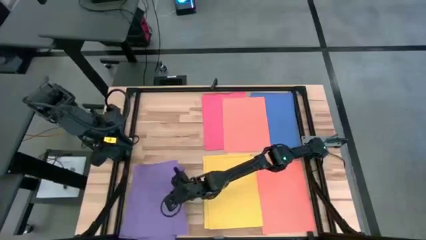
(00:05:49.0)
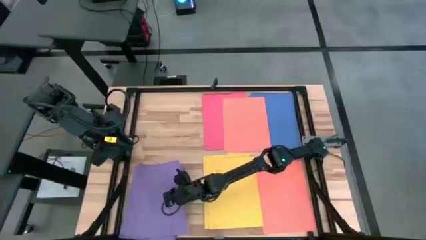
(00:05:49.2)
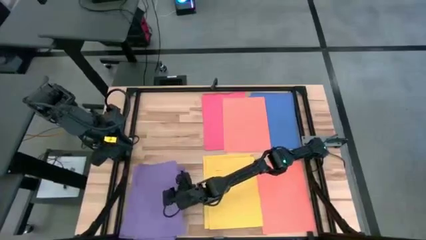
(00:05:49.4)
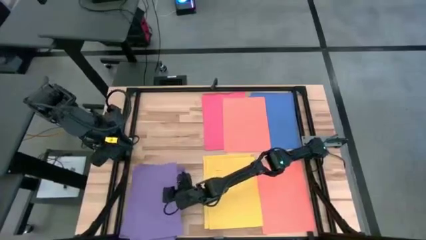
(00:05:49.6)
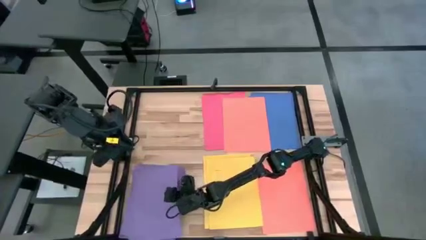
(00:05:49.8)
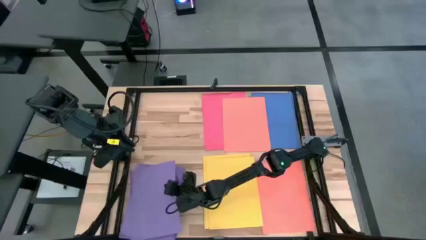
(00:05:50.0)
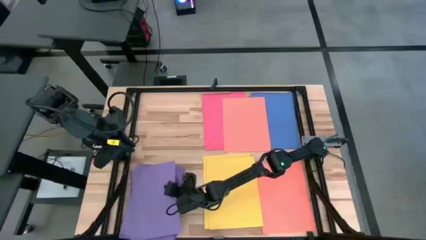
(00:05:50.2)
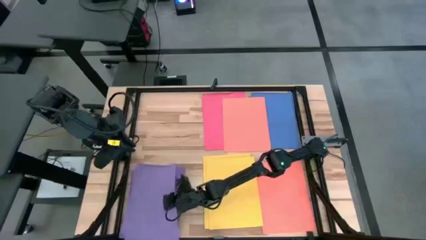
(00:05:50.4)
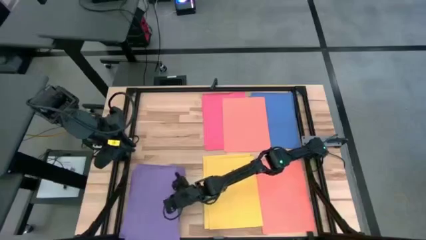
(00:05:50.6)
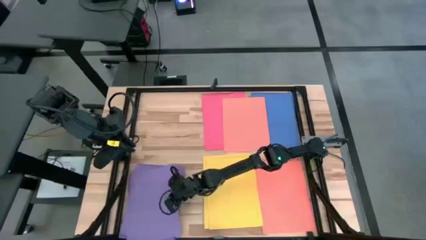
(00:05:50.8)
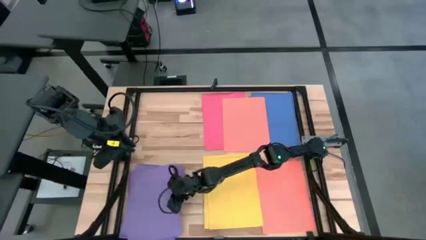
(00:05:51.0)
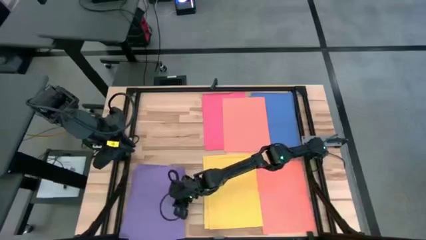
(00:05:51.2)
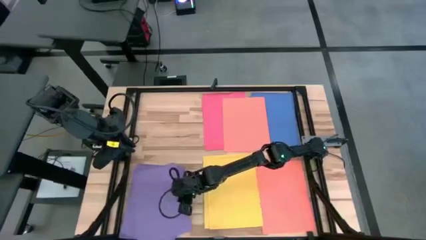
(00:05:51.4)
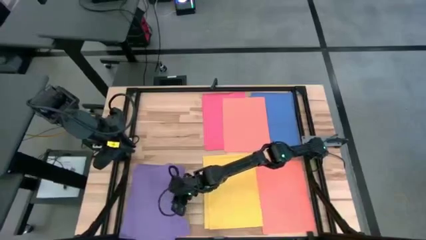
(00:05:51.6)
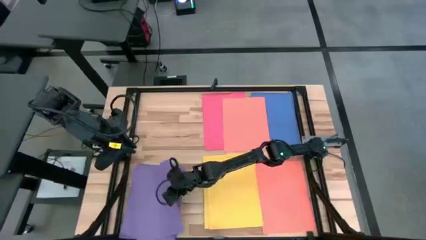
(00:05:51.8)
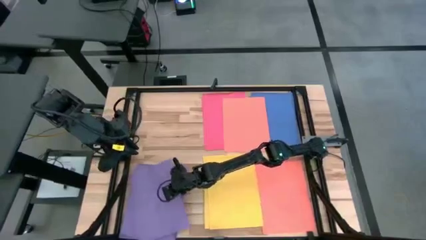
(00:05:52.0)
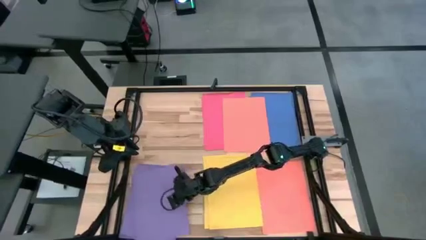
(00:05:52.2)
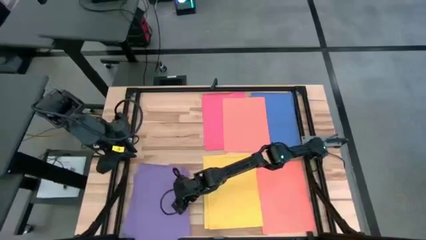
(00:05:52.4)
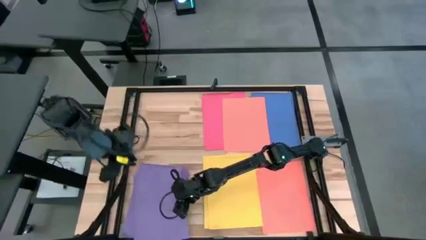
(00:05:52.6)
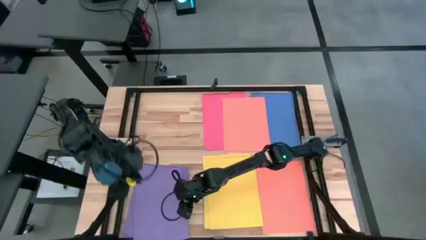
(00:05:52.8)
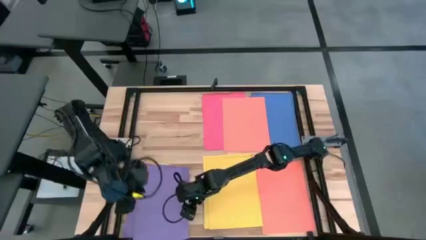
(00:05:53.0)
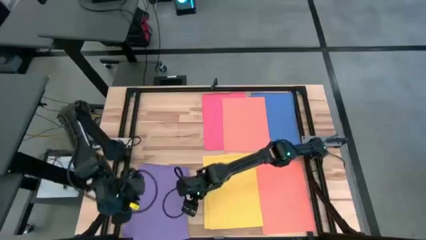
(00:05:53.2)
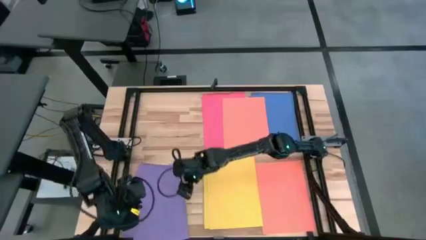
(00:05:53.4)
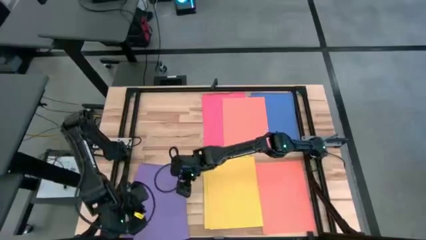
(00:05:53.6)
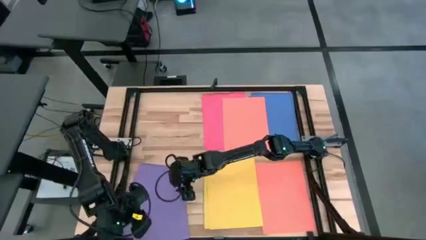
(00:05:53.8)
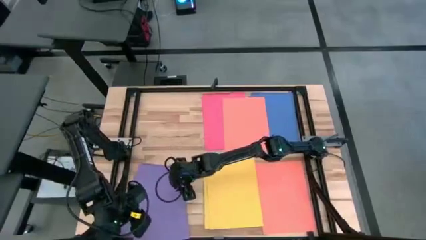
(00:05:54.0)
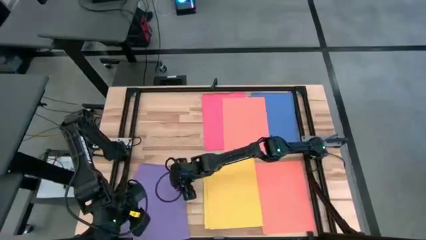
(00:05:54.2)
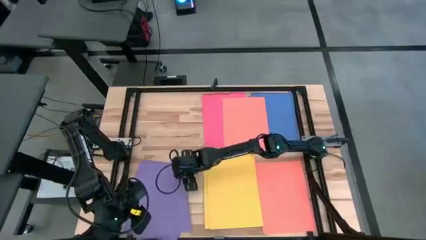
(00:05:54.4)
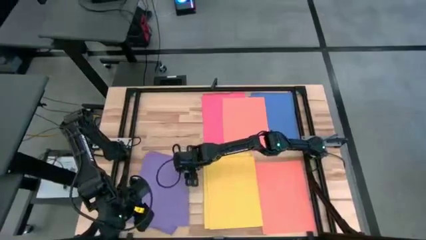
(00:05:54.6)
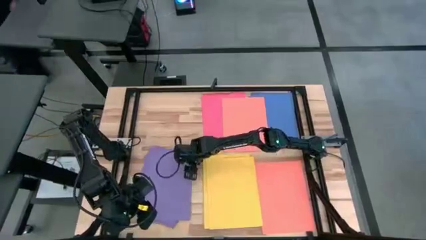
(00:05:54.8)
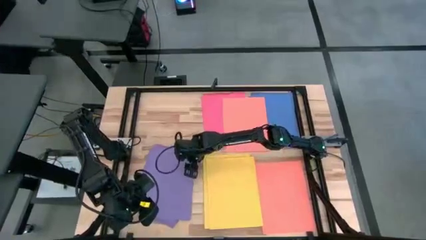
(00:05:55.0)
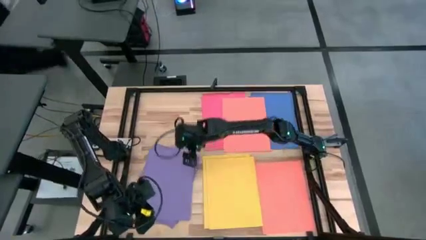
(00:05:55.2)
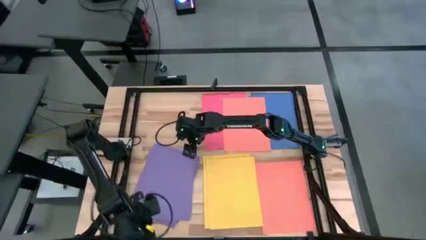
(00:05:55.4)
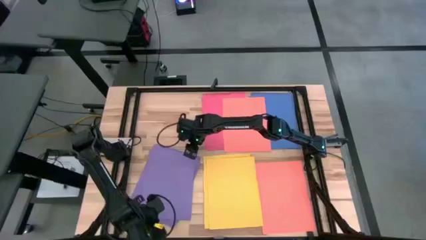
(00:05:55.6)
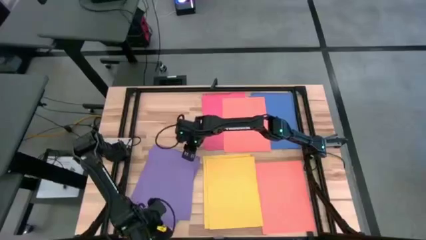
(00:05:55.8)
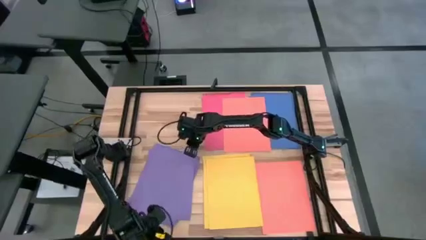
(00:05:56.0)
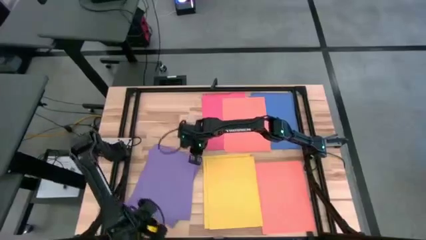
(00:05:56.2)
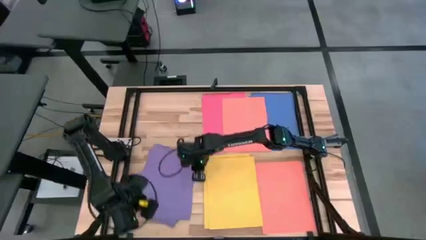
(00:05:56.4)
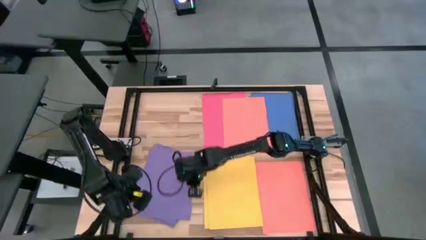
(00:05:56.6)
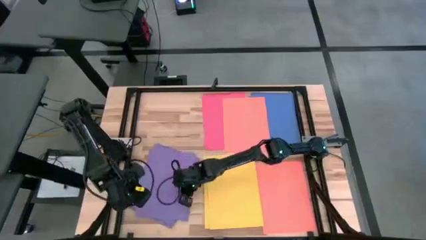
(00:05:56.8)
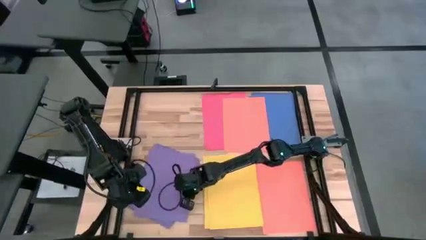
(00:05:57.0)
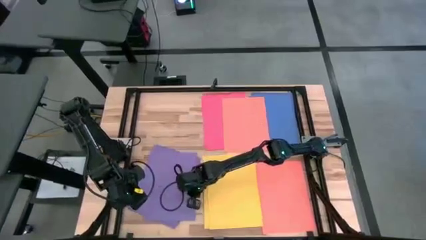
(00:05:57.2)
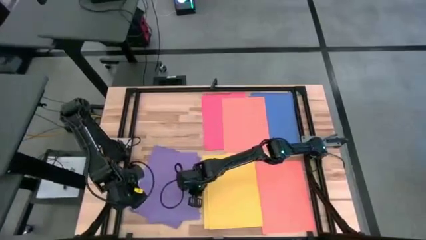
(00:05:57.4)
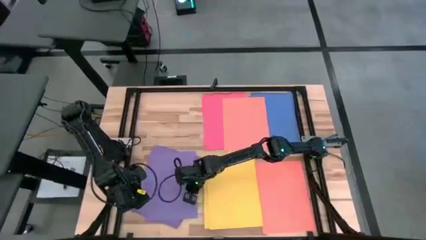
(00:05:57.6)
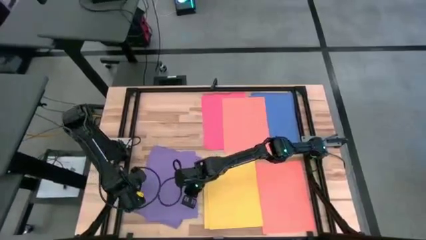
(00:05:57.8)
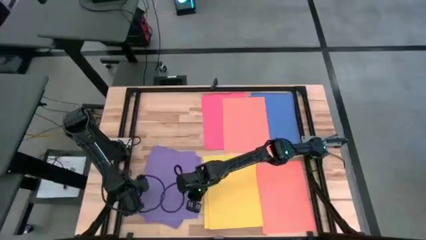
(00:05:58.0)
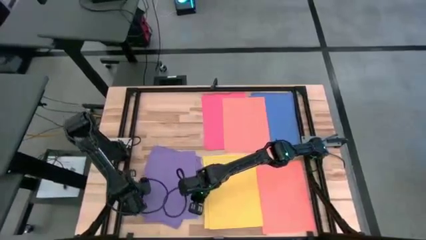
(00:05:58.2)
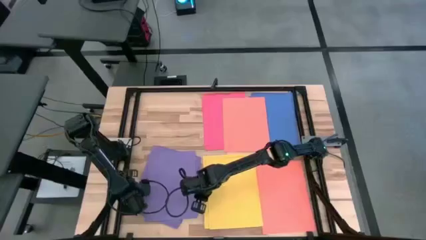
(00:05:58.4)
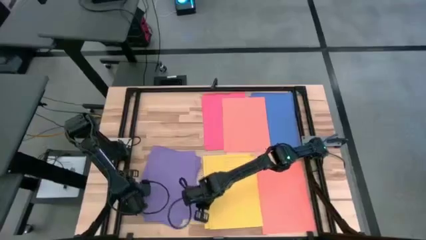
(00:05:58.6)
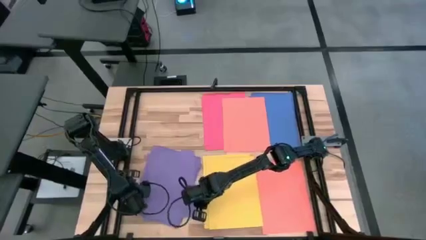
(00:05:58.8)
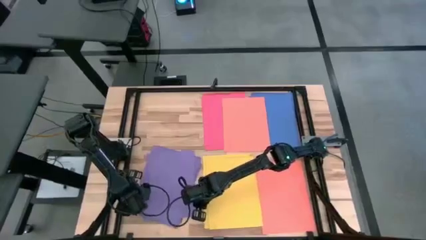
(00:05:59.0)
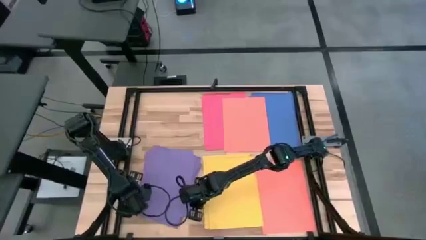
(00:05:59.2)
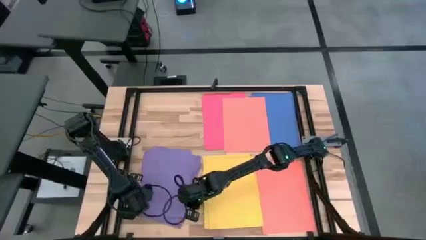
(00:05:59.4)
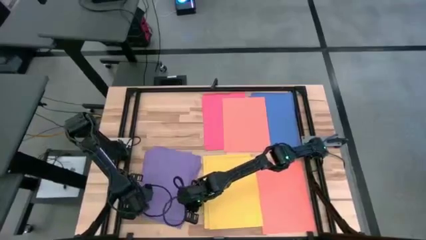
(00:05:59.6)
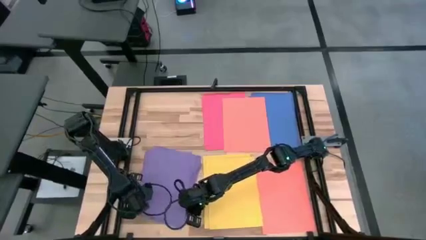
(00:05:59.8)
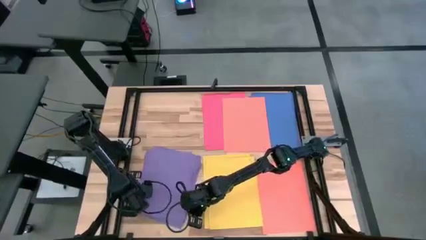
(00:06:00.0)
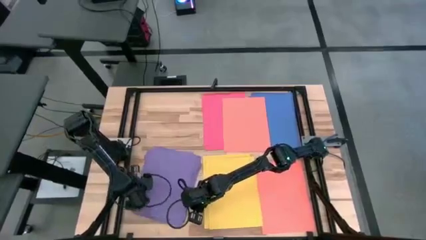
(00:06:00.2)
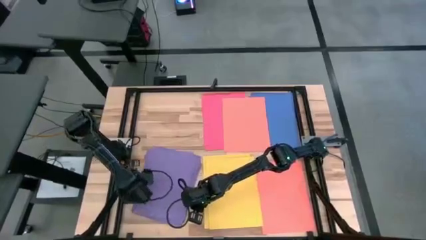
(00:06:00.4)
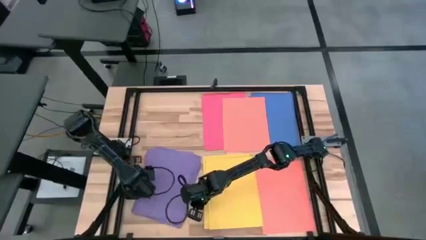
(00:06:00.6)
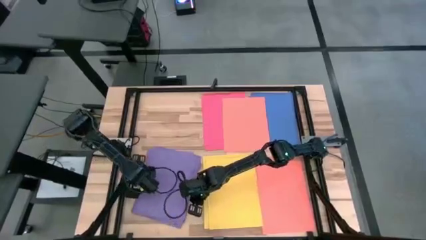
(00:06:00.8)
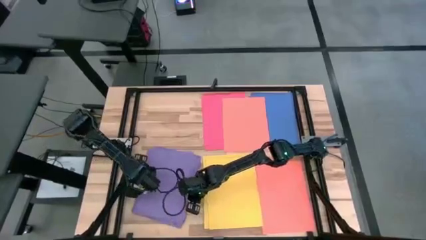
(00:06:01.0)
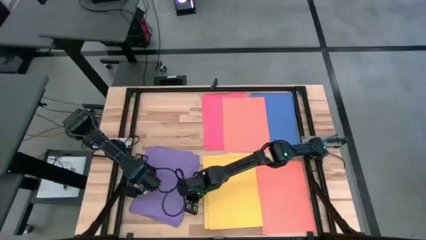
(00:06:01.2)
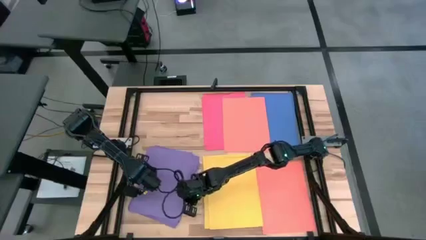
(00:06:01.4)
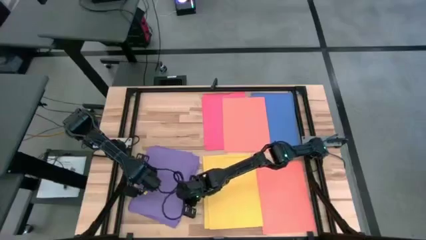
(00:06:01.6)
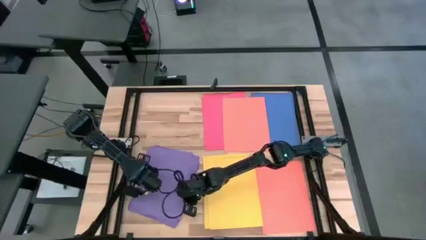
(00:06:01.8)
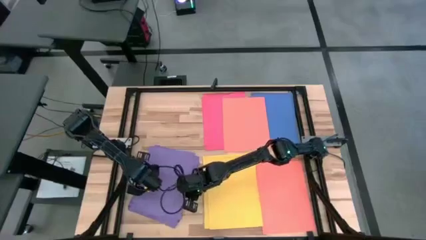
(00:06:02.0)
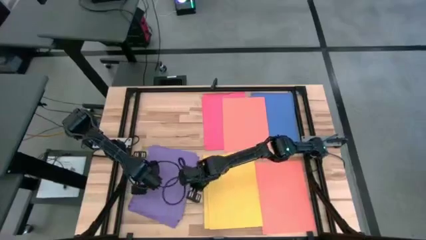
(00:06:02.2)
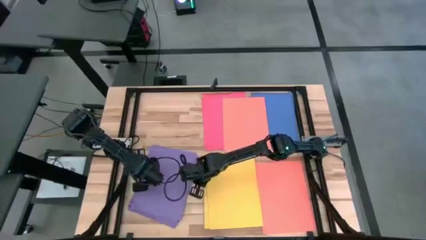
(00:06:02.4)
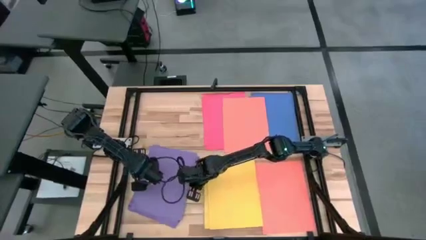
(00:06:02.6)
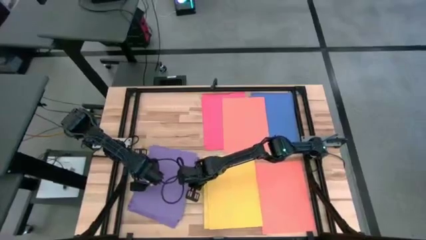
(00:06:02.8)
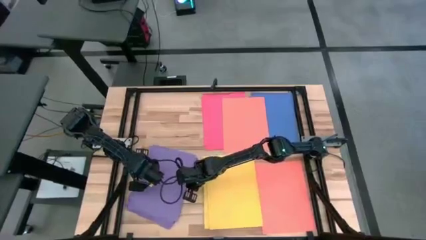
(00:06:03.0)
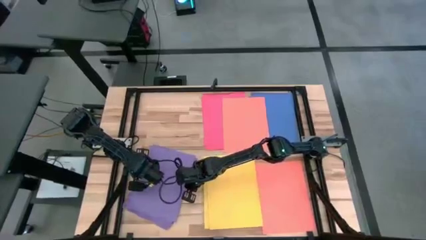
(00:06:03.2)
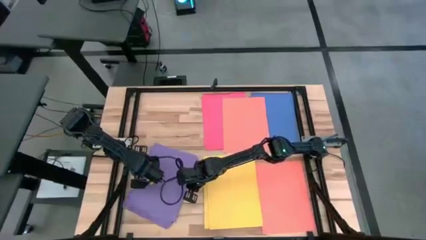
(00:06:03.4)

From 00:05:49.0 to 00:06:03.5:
Task: Organize paper
Stack the purple paper on top of the purple paper
